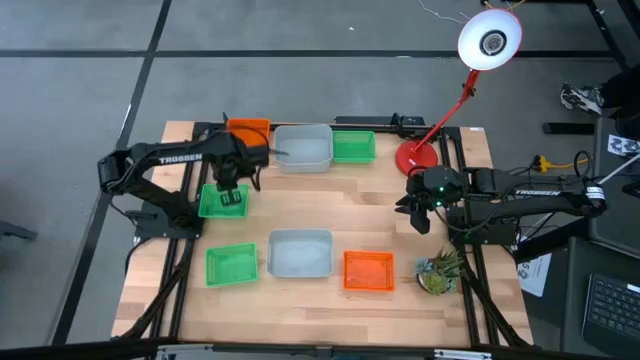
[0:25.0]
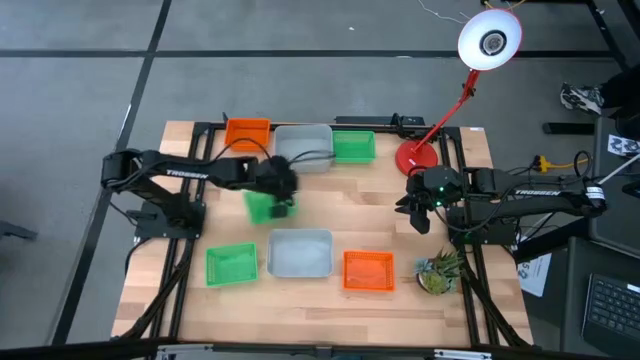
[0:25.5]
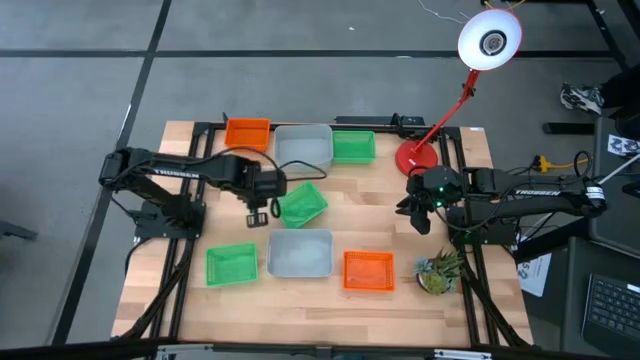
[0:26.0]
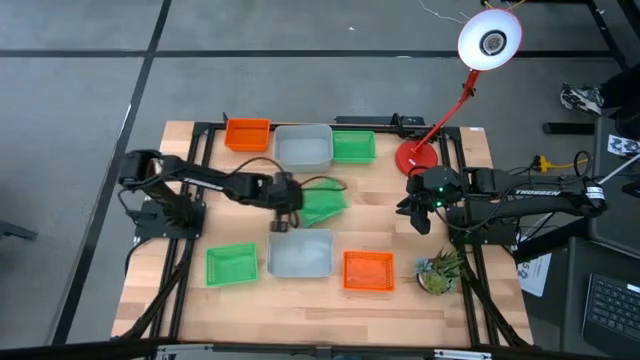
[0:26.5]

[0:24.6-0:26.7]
Move the top left green bin to the middle of the table

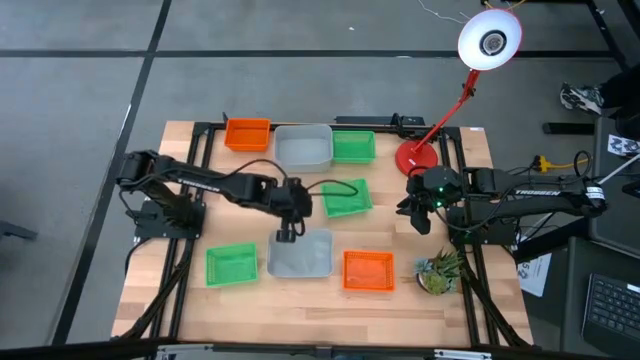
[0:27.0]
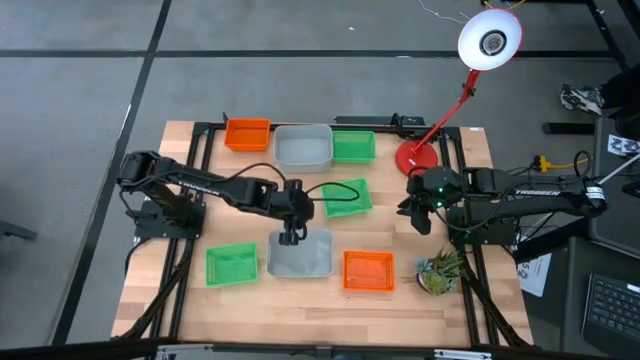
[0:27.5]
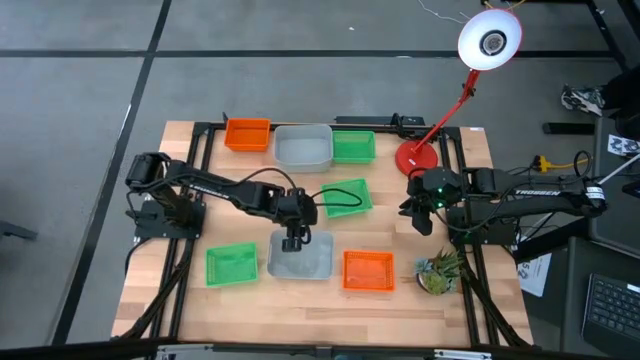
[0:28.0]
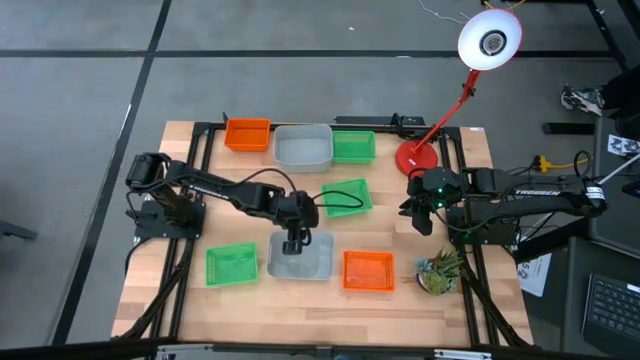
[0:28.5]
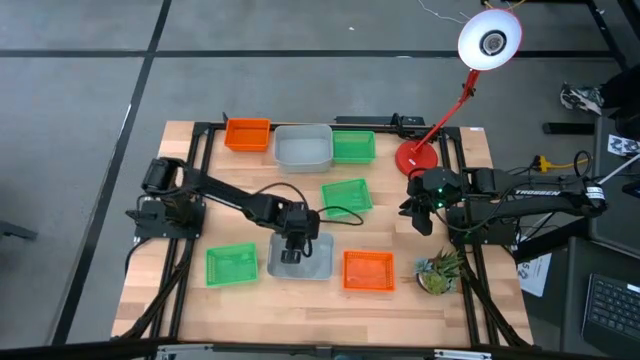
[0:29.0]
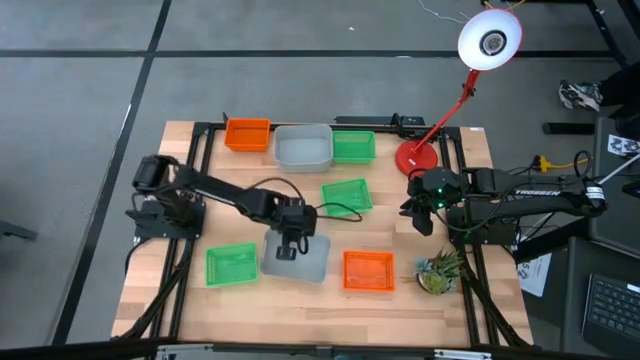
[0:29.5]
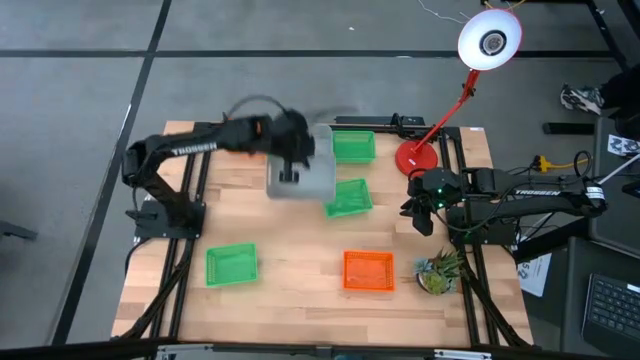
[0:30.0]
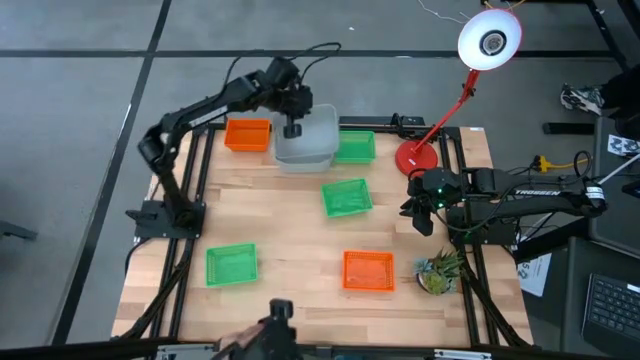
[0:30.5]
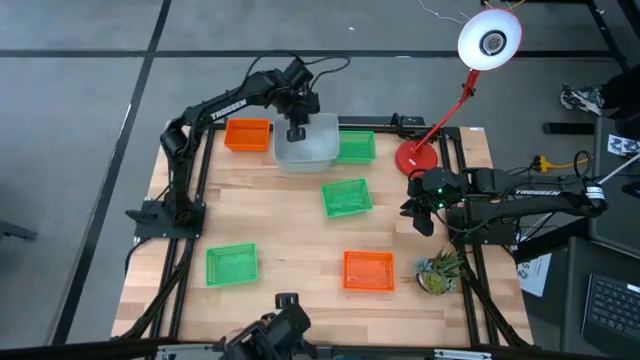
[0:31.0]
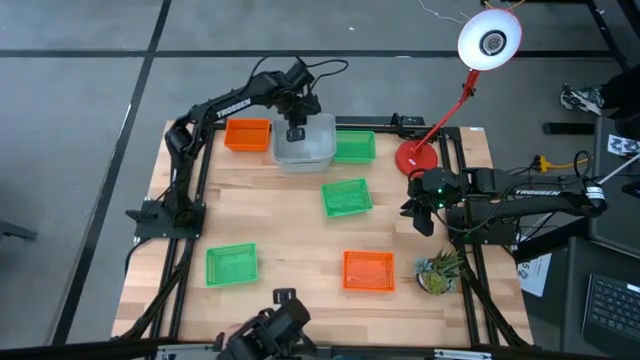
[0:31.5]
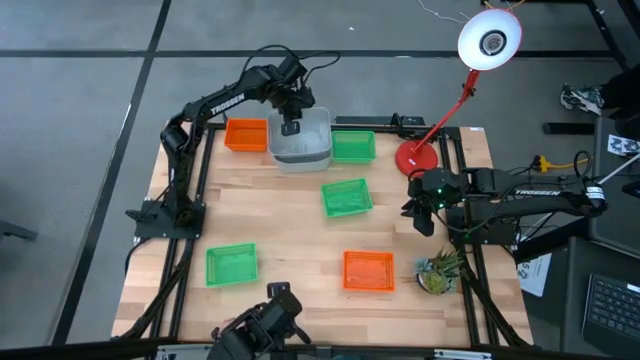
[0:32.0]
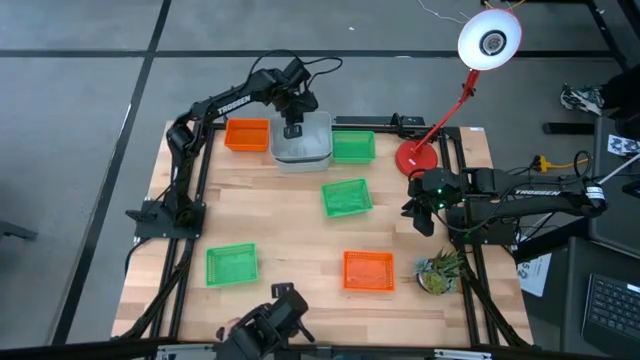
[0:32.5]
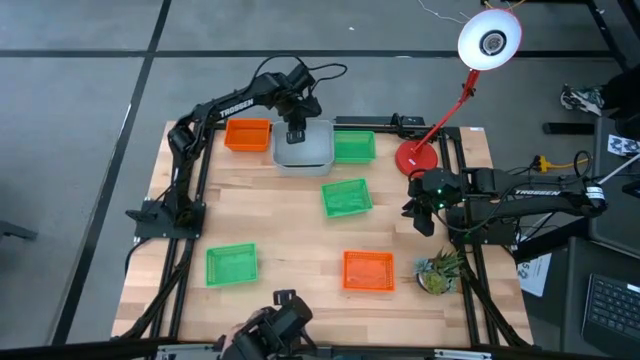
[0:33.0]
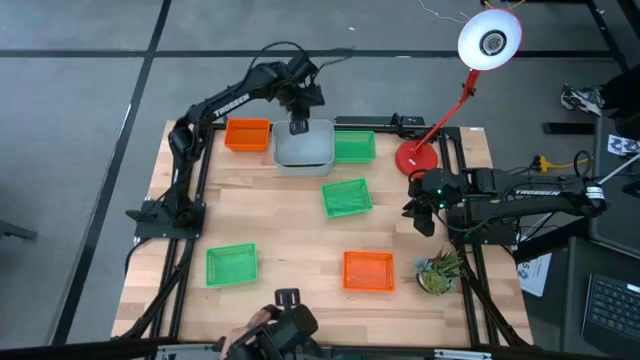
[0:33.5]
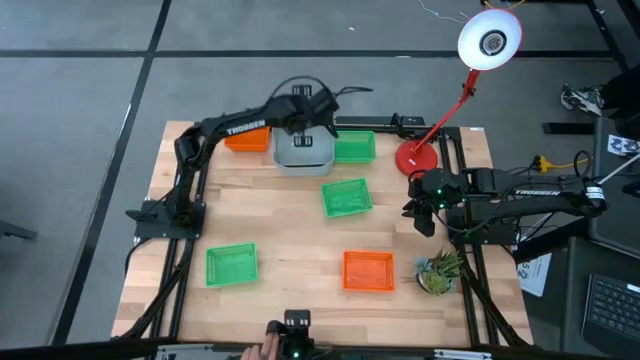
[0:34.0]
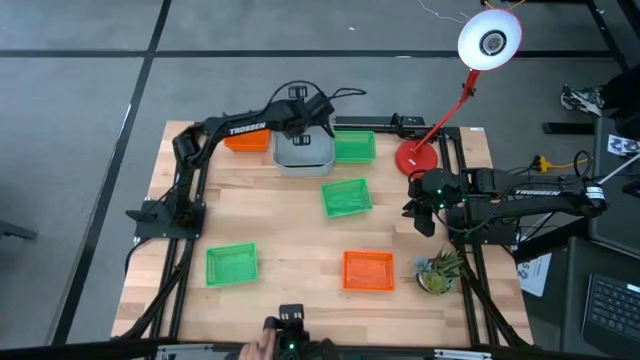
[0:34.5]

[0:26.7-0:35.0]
Stack the bottom gray bin on the gray bins

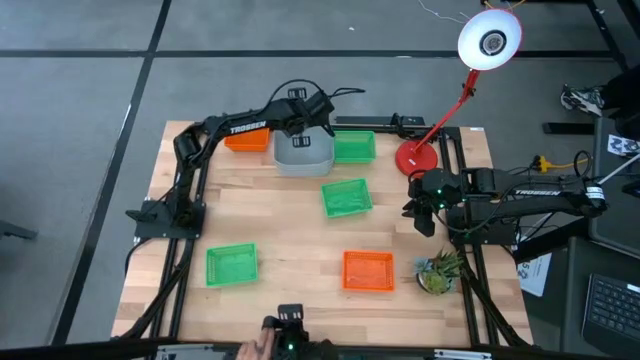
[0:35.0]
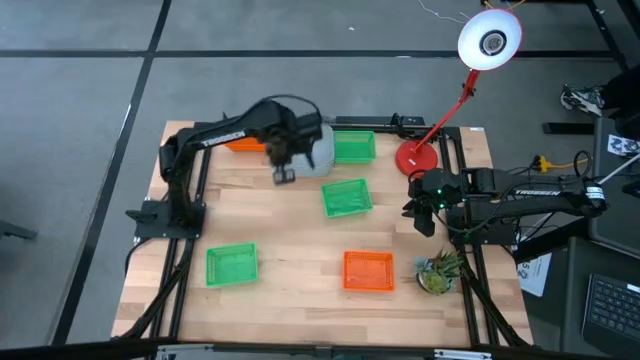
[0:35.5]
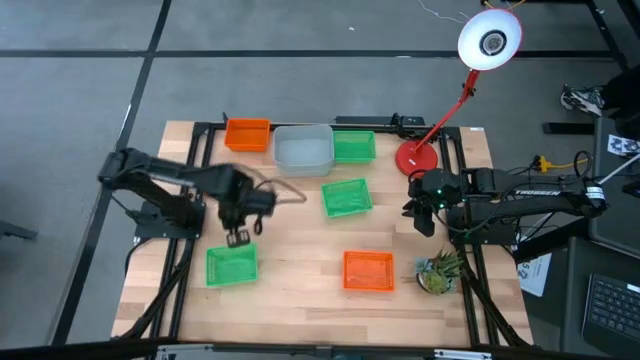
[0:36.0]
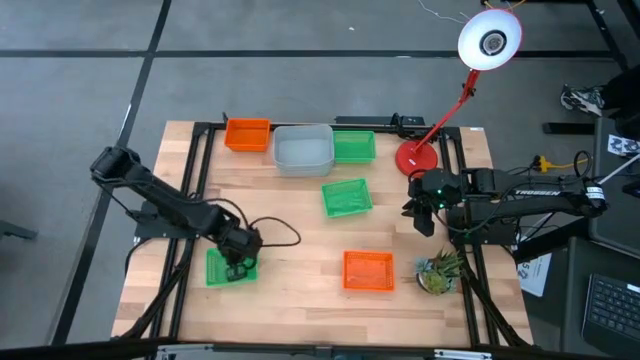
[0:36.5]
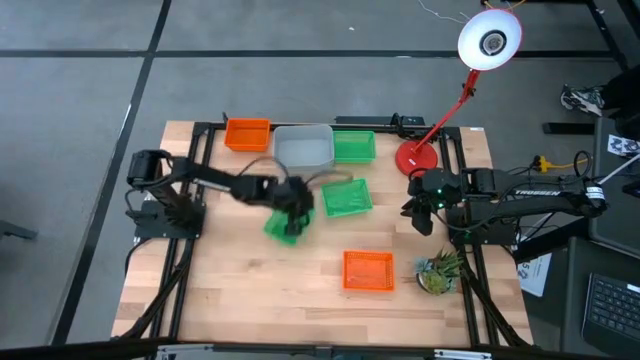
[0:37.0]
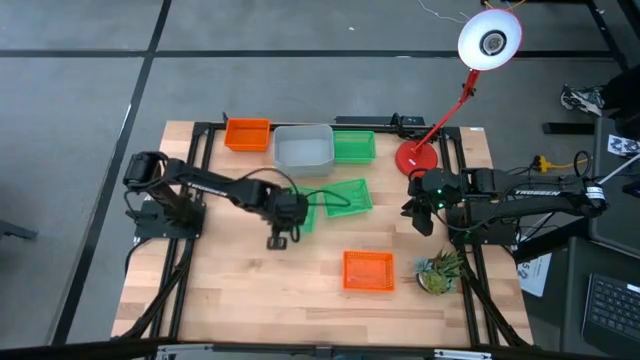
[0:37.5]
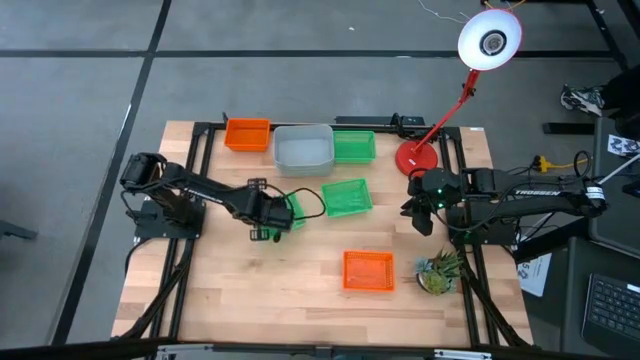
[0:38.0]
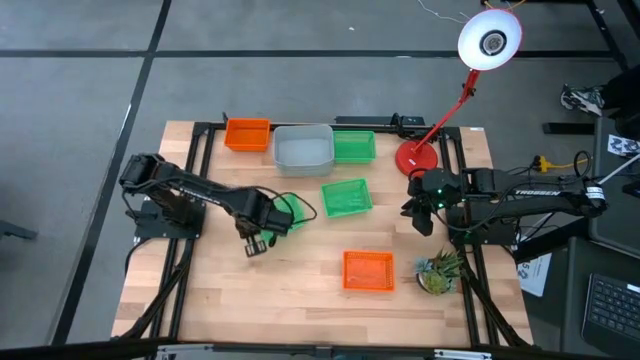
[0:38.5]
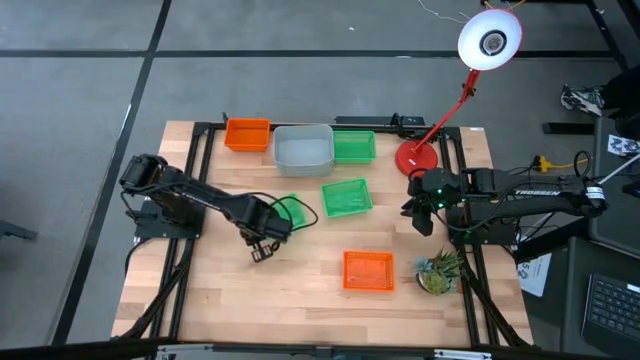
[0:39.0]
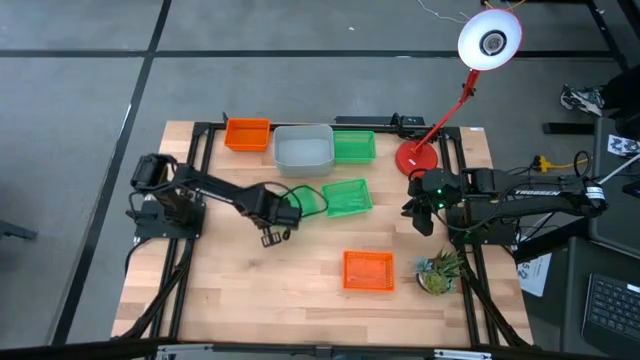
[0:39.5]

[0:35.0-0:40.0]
Move the left green bin to the middle of the table

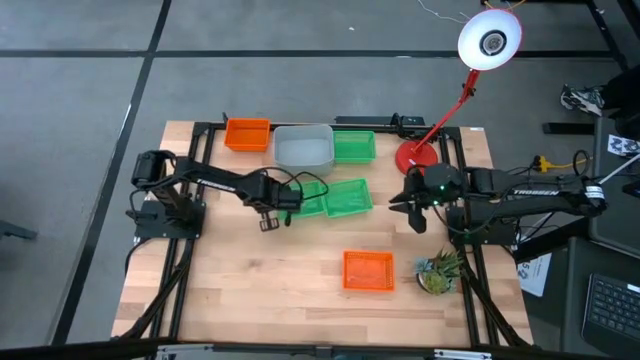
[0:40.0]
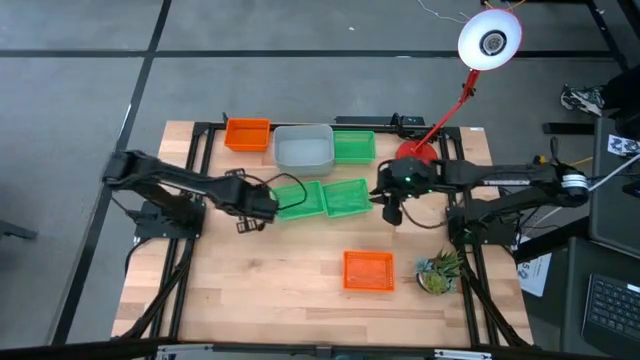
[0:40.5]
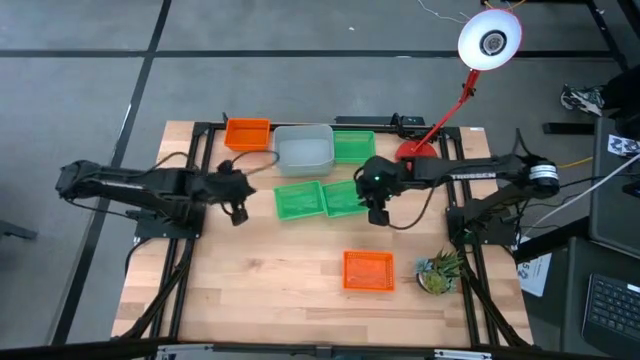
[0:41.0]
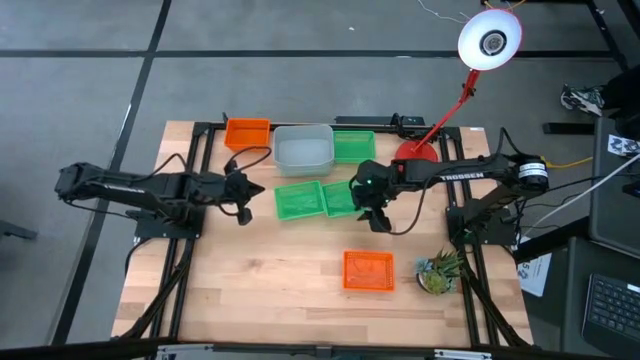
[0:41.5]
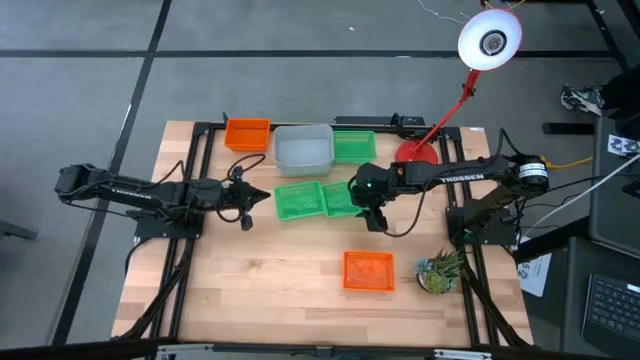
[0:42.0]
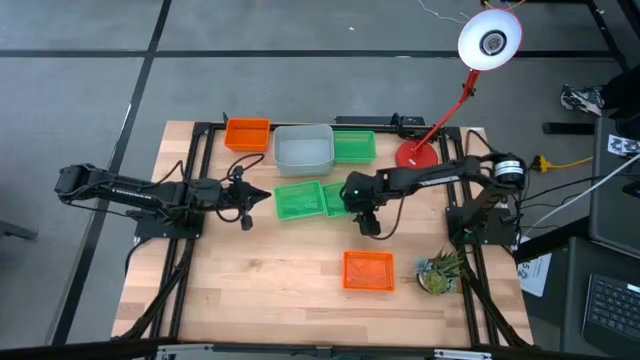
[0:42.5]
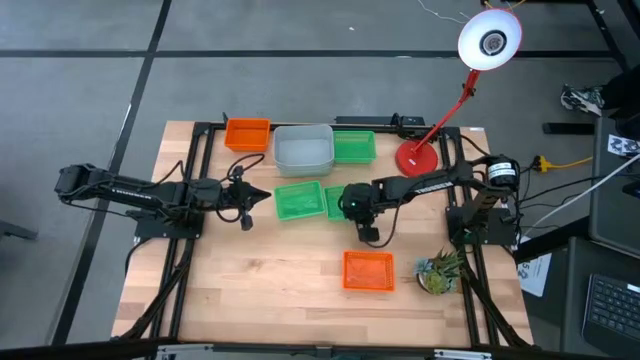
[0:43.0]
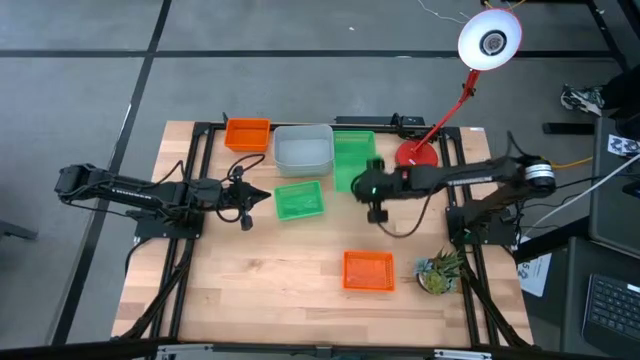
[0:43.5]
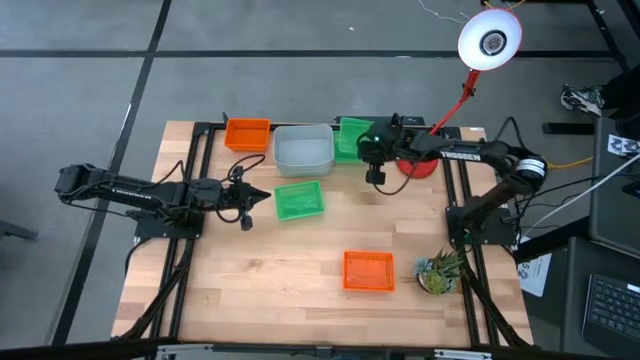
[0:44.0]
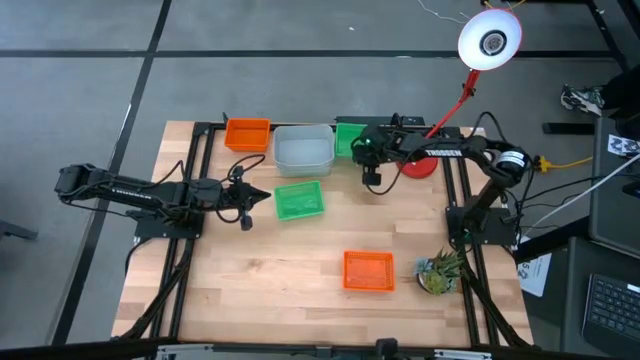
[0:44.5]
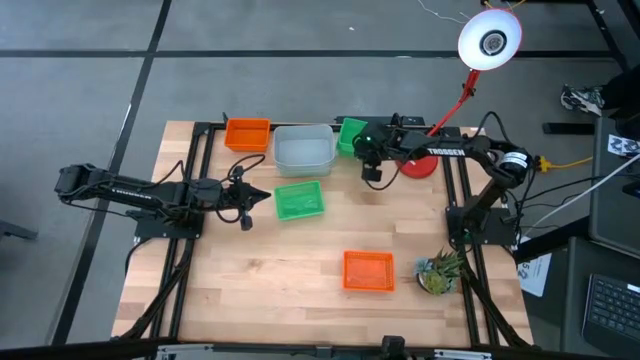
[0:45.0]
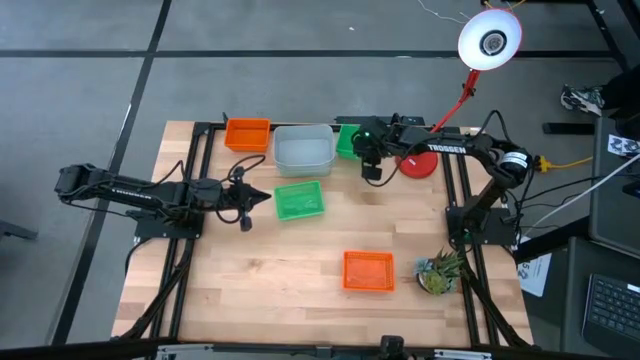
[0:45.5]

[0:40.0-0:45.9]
Stack the bottom right green bin on the green bin
